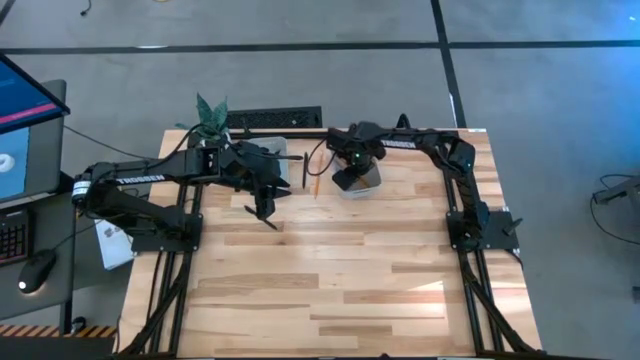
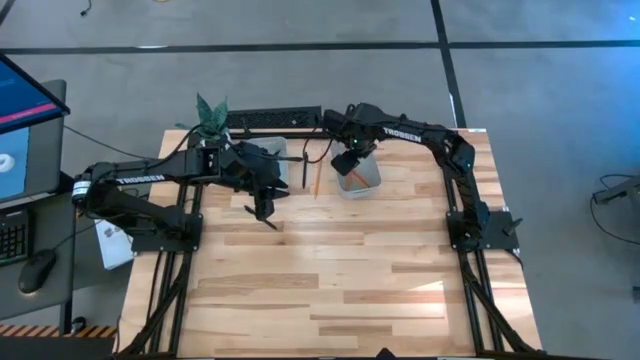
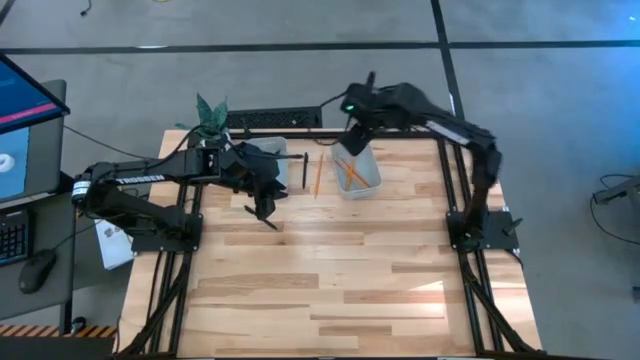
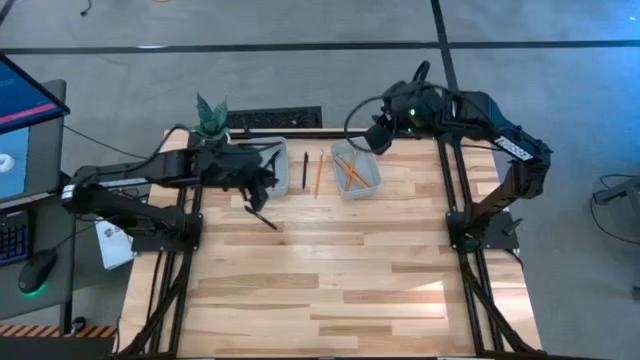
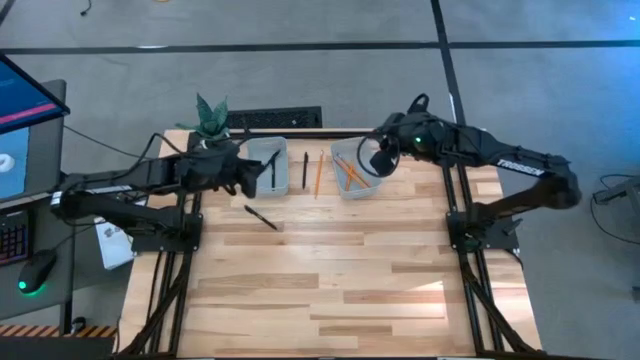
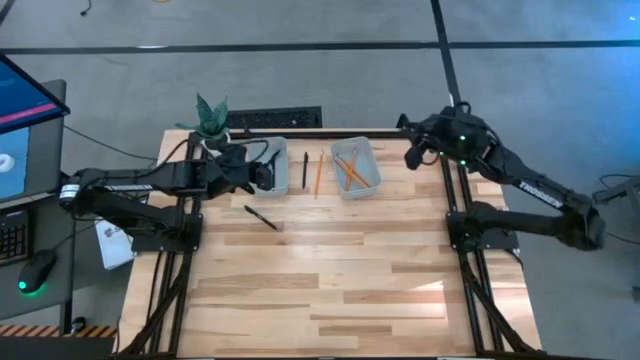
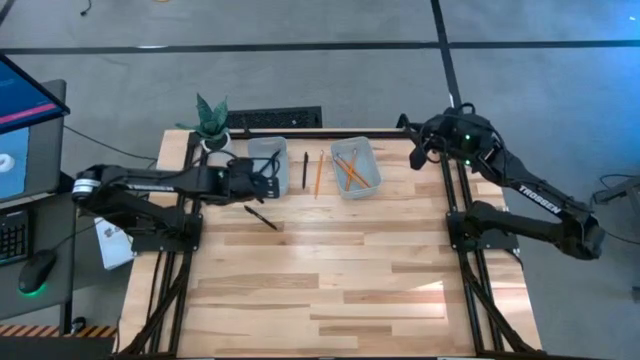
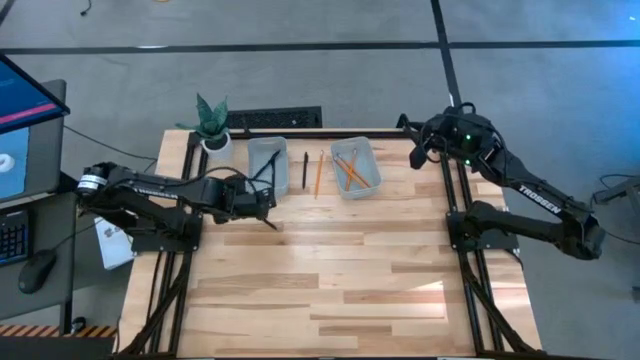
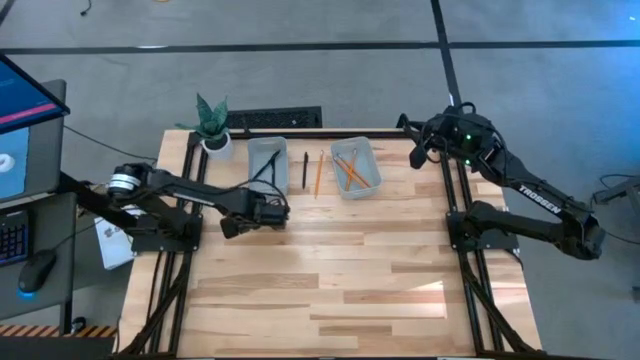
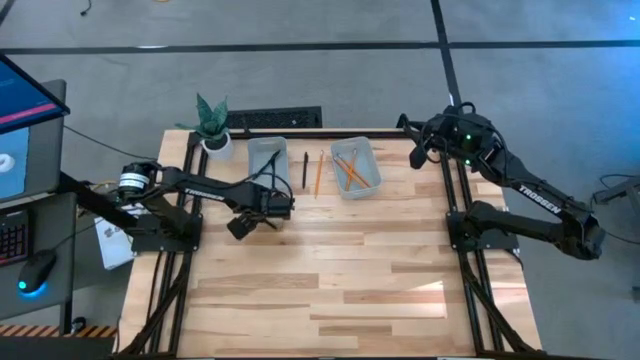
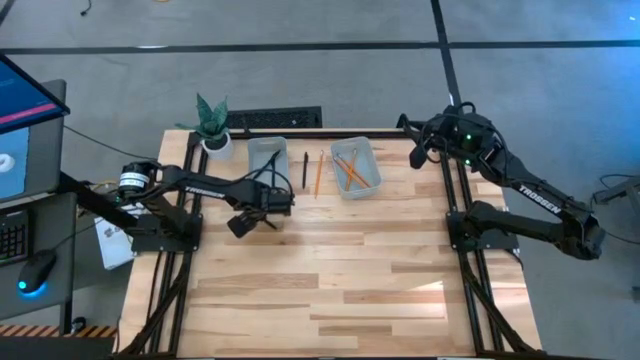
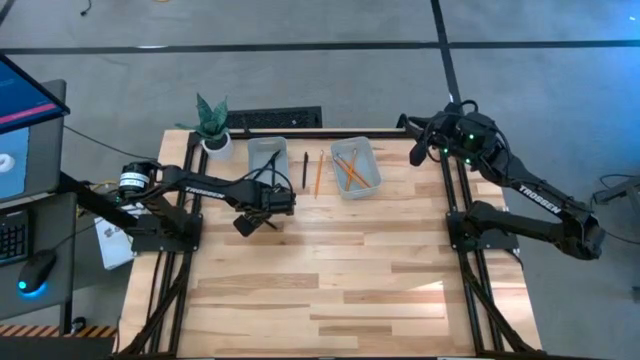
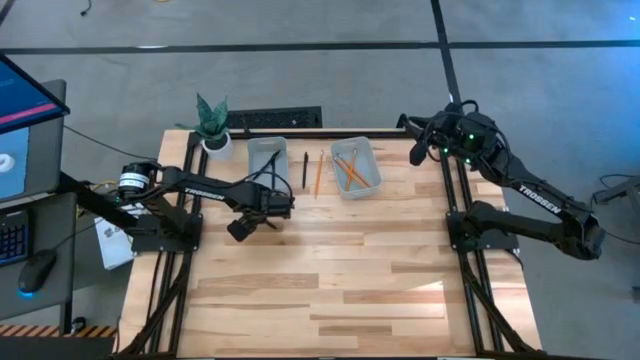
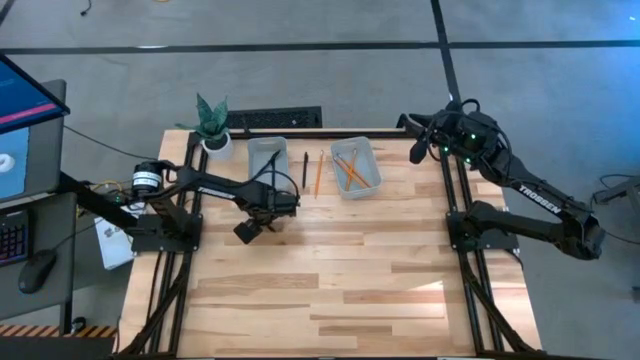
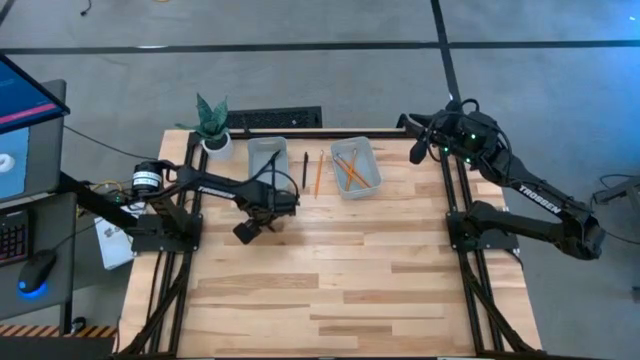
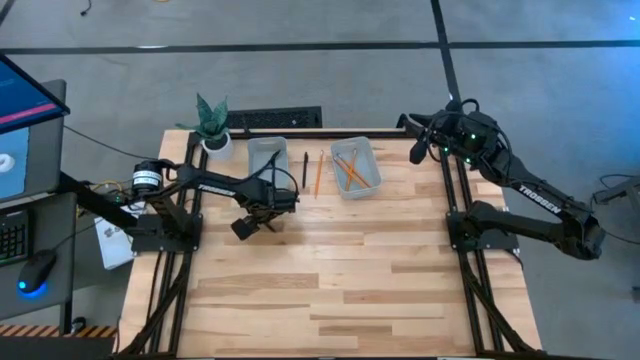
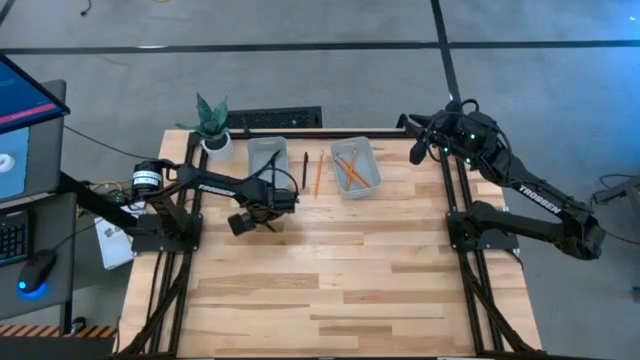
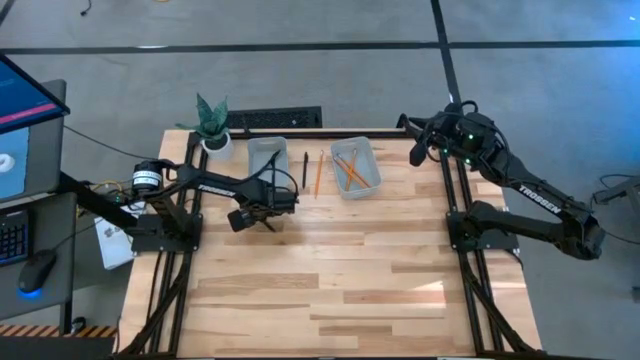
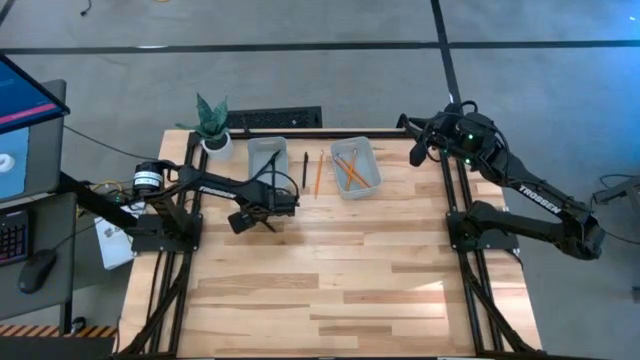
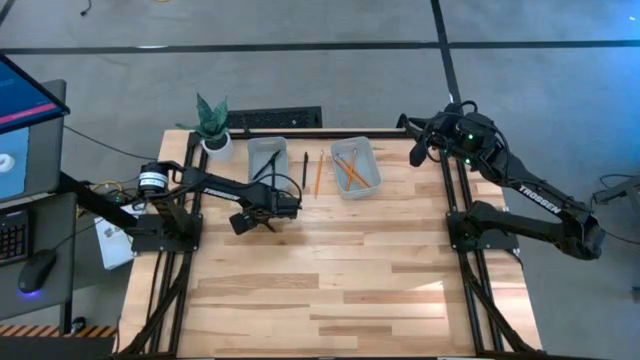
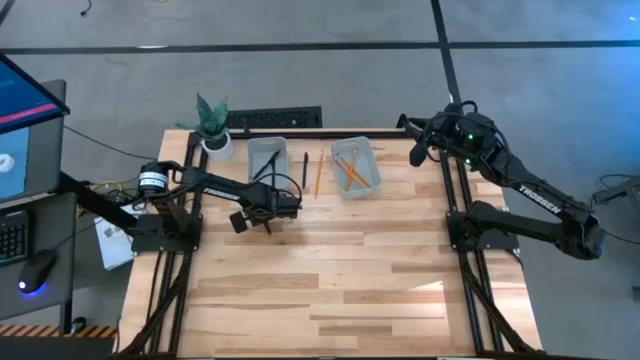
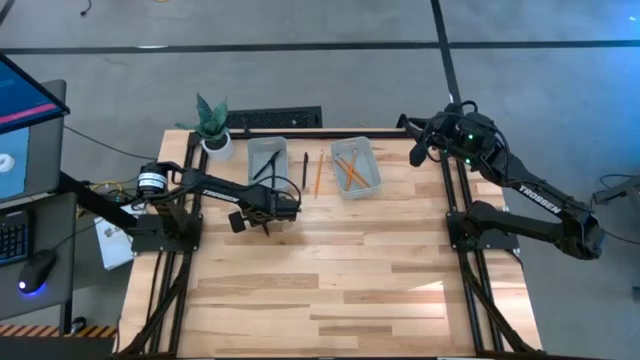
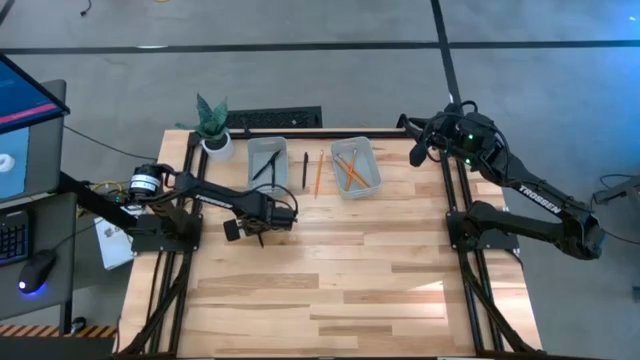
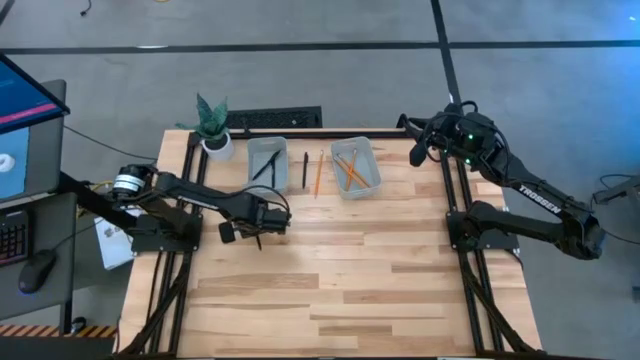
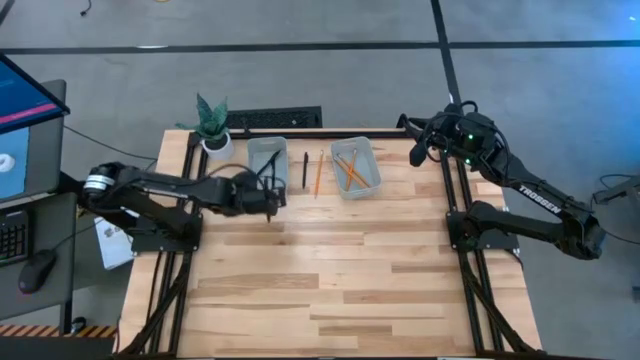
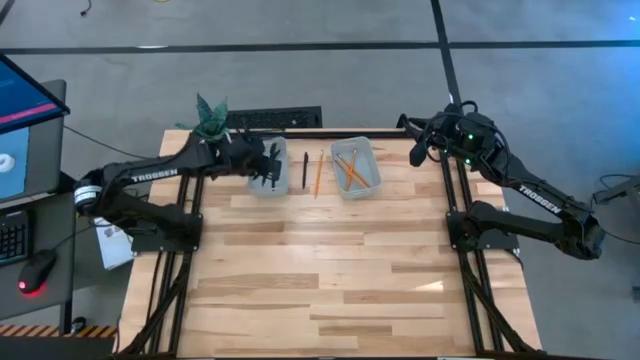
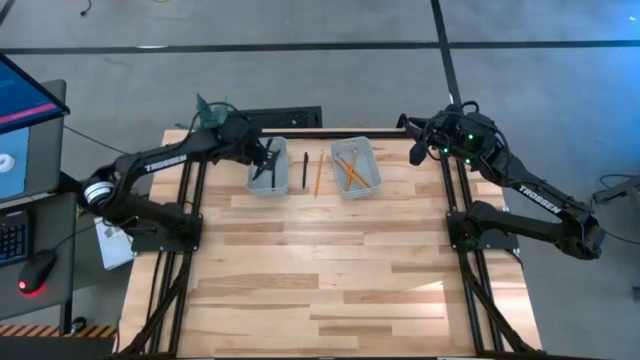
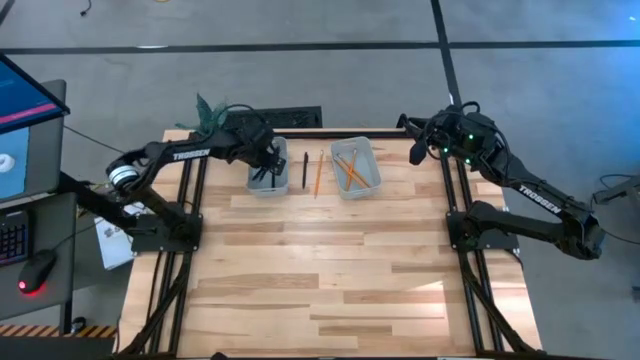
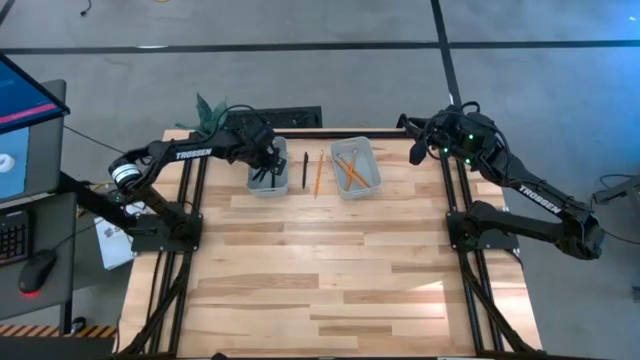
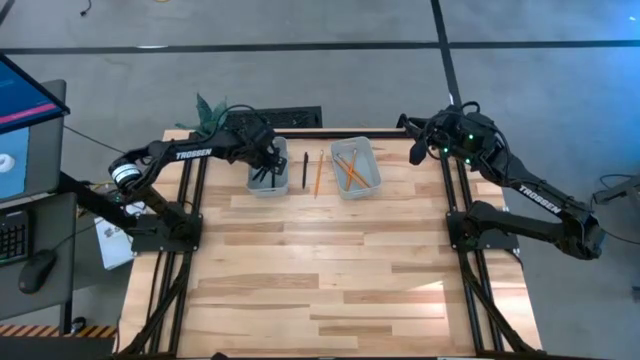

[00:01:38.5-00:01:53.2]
Task: Sort pens & pencils
Put the black pen into the left gray bin

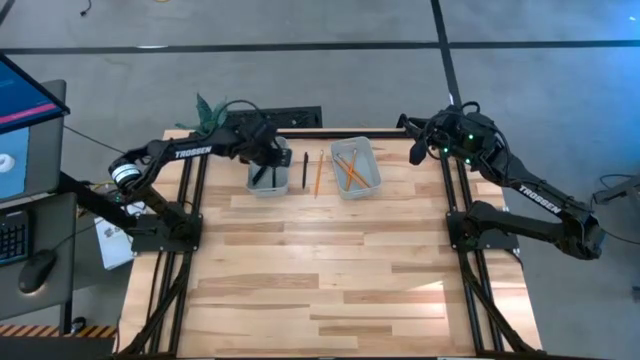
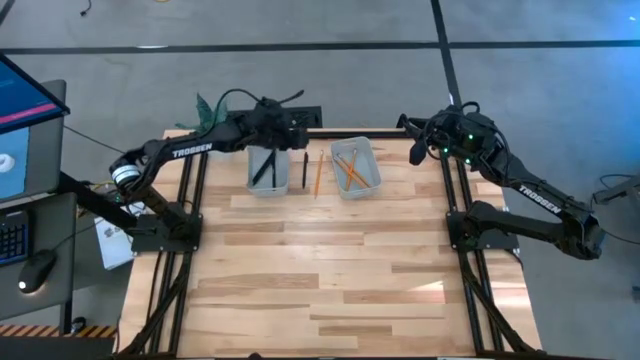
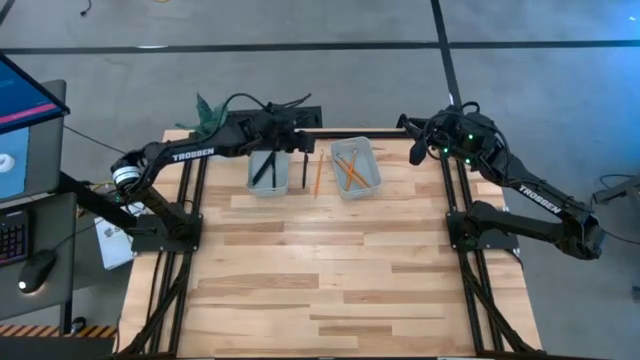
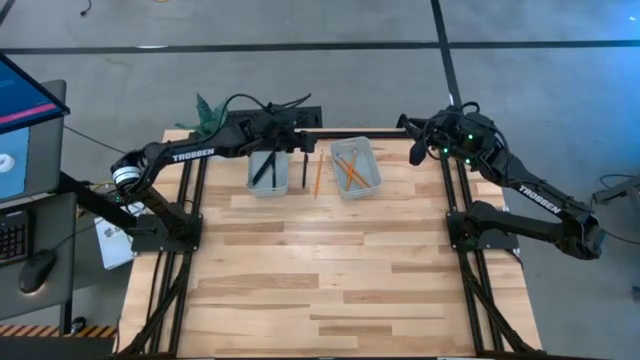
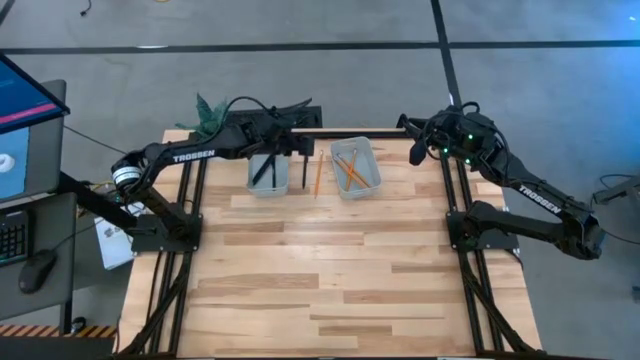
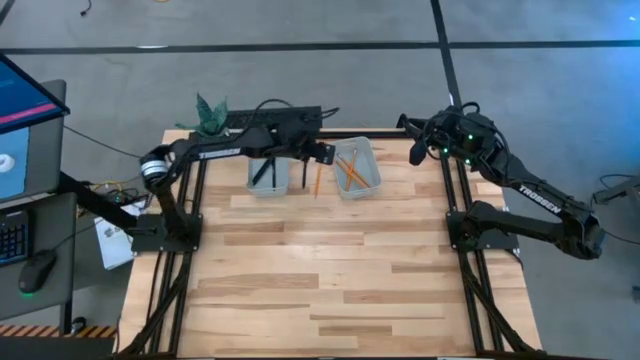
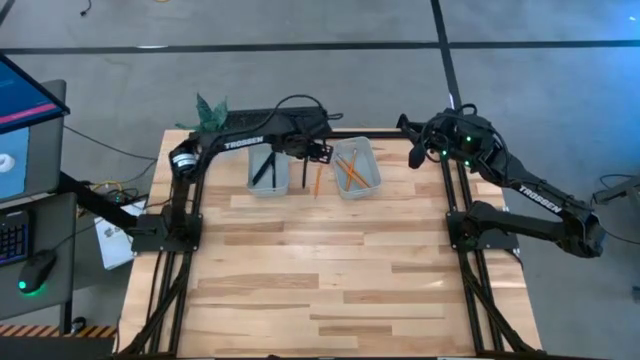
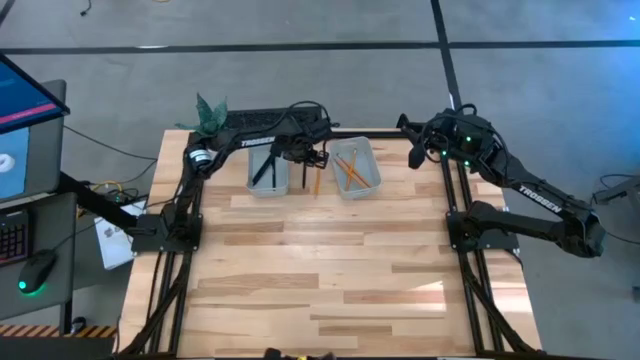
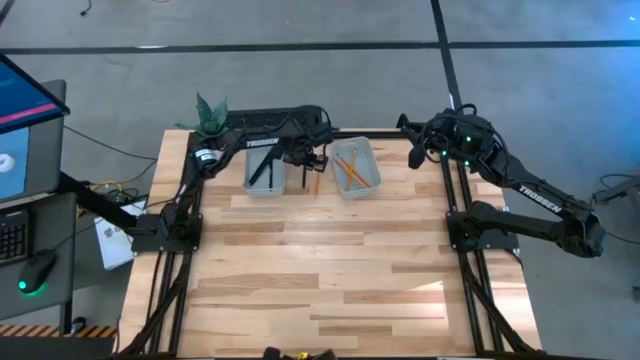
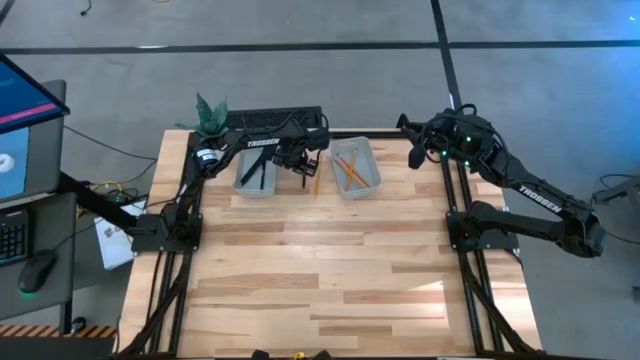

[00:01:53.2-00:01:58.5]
Adjust the left gray bin

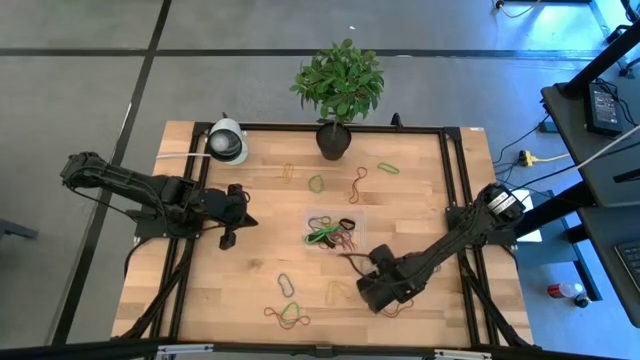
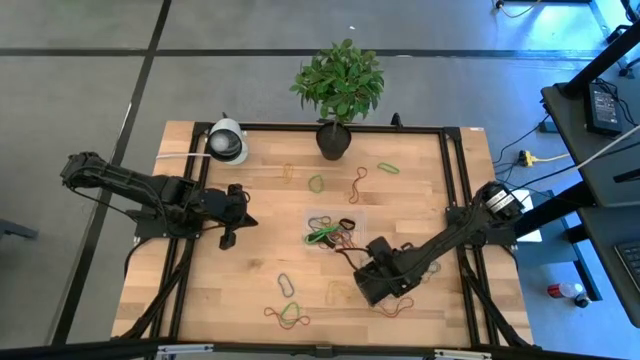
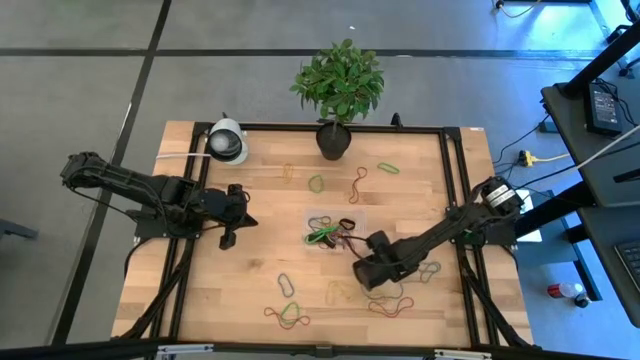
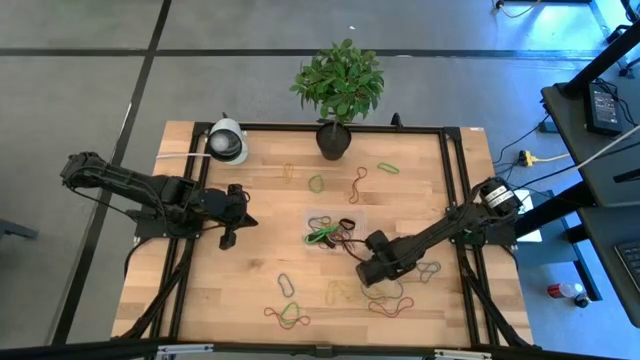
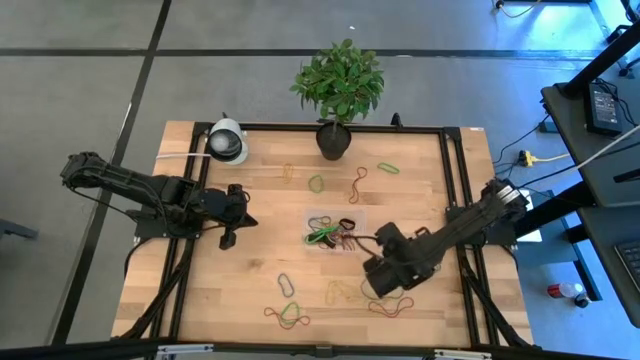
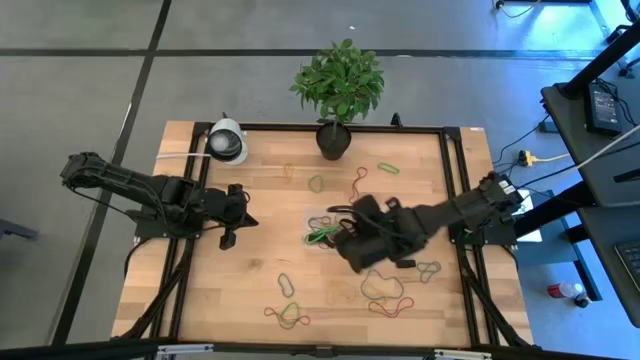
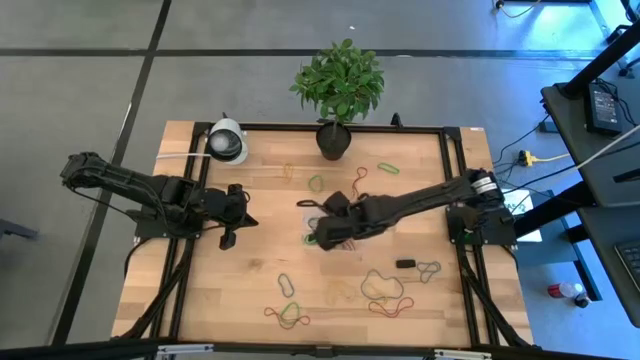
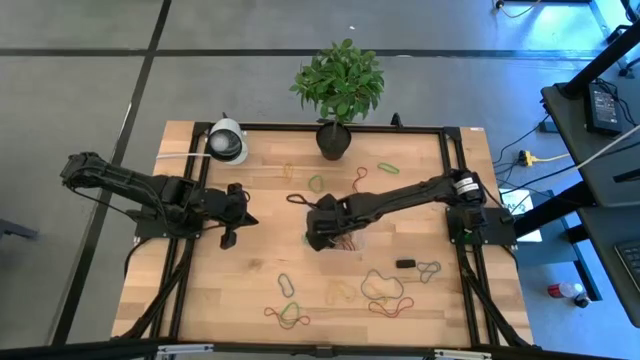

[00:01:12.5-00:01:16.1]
Task: Pick and place rubber bands into bin
Put the blue rubber band into the bin
